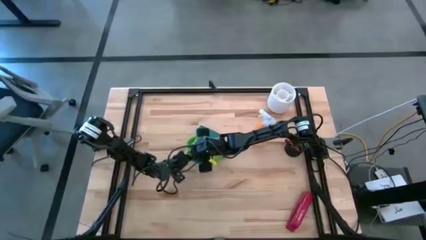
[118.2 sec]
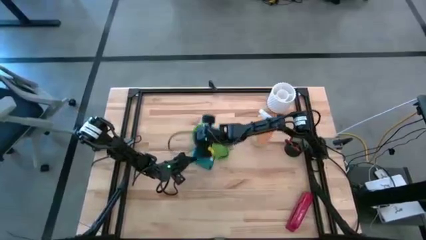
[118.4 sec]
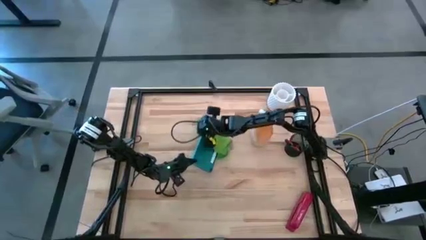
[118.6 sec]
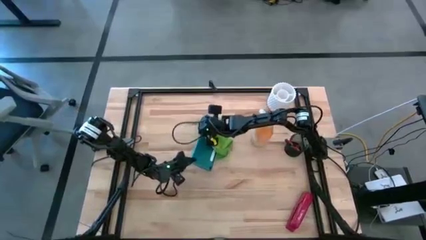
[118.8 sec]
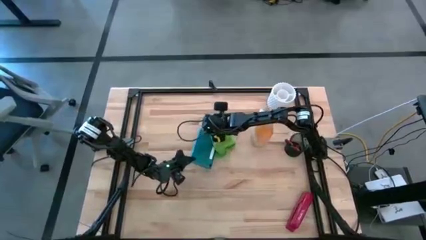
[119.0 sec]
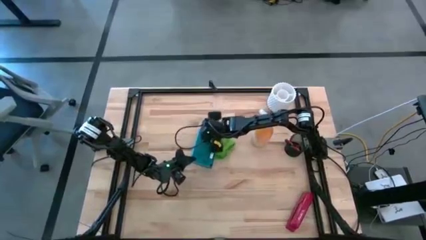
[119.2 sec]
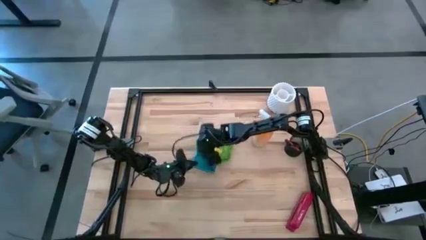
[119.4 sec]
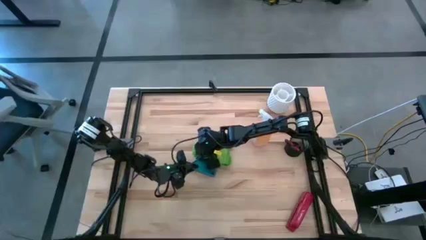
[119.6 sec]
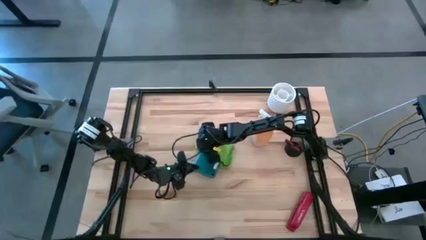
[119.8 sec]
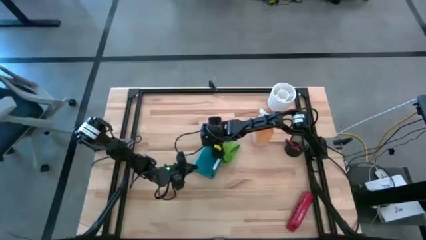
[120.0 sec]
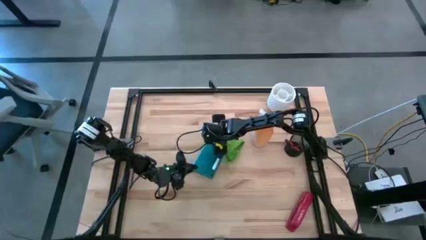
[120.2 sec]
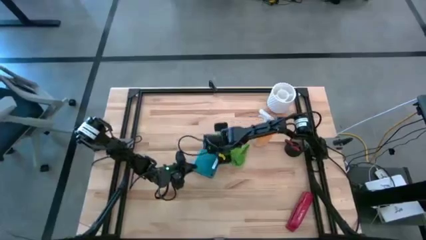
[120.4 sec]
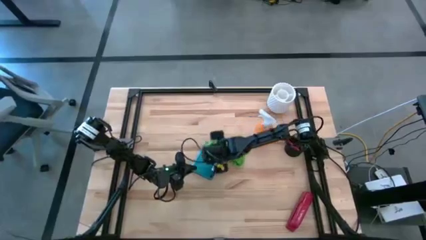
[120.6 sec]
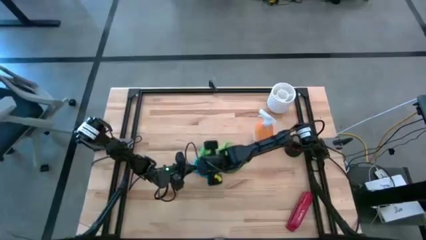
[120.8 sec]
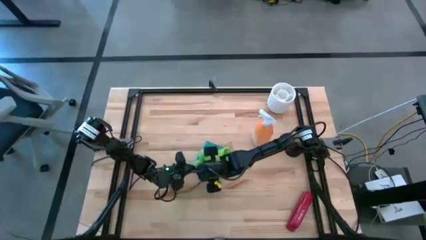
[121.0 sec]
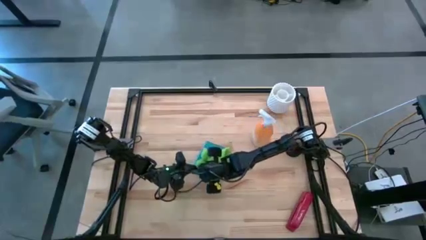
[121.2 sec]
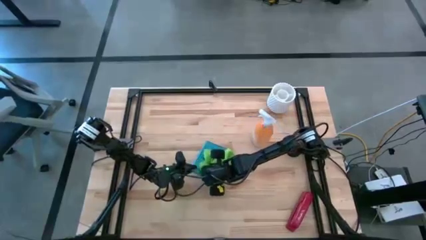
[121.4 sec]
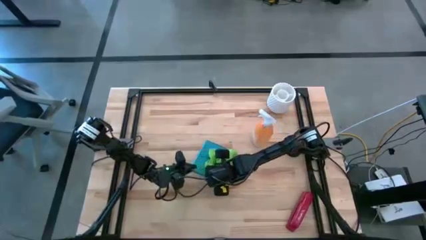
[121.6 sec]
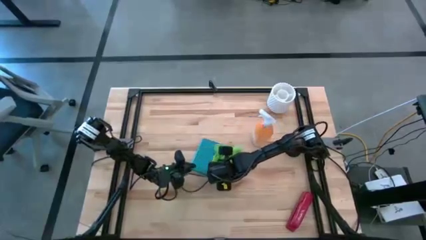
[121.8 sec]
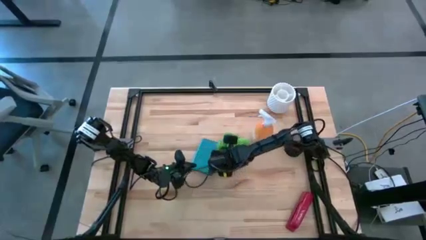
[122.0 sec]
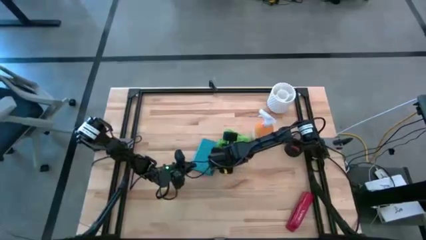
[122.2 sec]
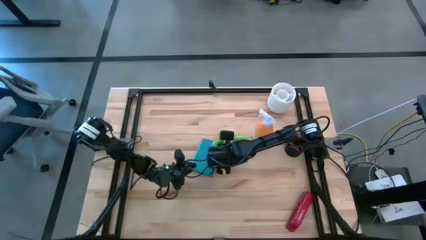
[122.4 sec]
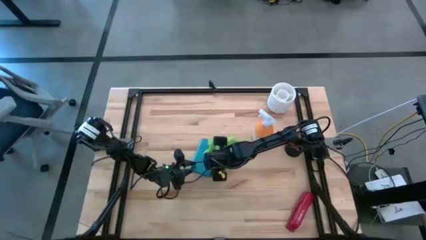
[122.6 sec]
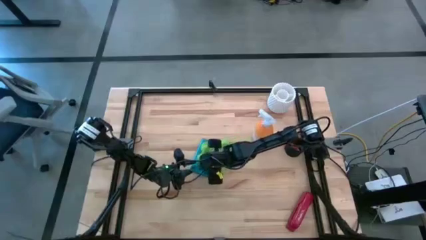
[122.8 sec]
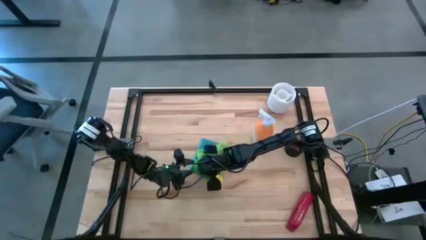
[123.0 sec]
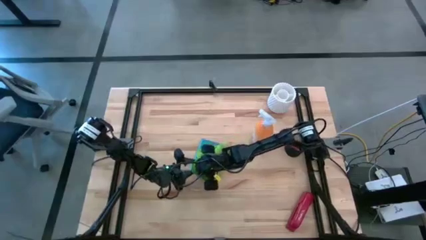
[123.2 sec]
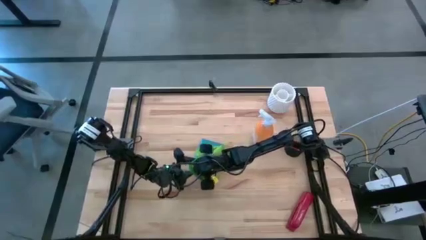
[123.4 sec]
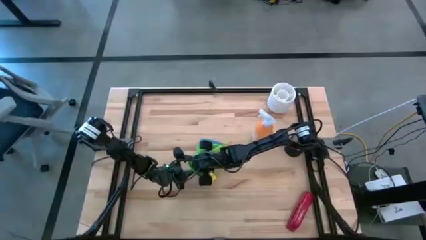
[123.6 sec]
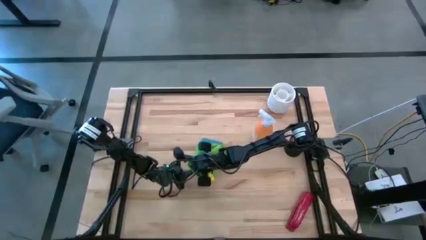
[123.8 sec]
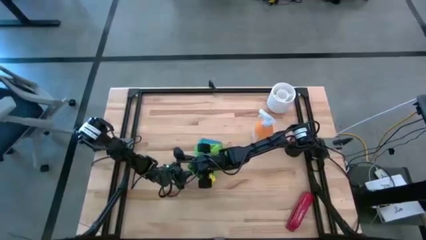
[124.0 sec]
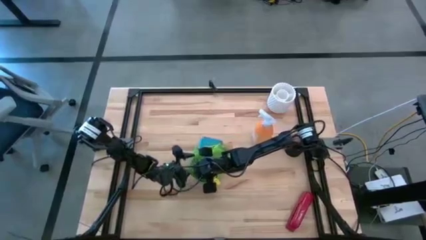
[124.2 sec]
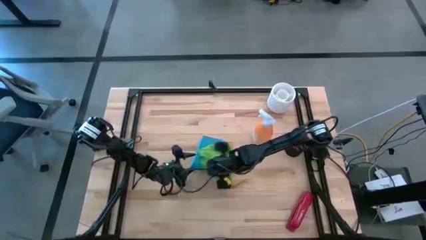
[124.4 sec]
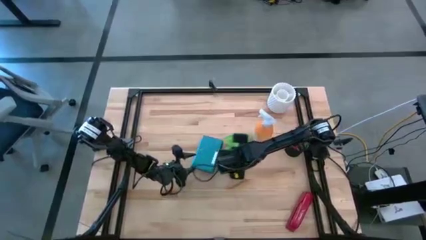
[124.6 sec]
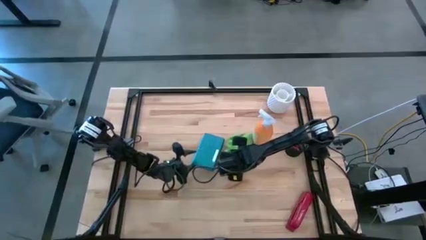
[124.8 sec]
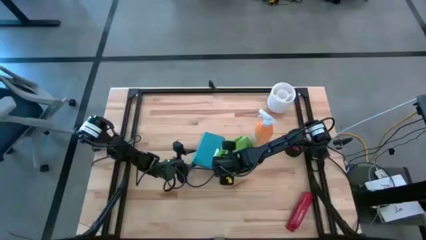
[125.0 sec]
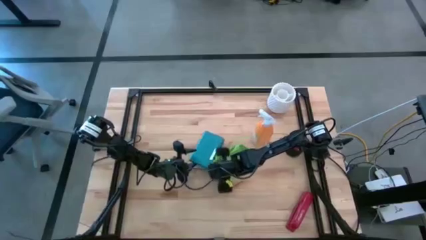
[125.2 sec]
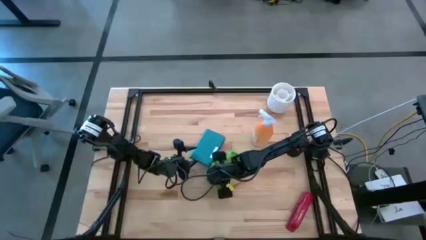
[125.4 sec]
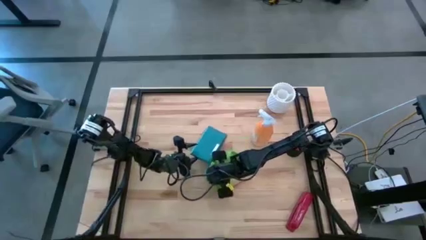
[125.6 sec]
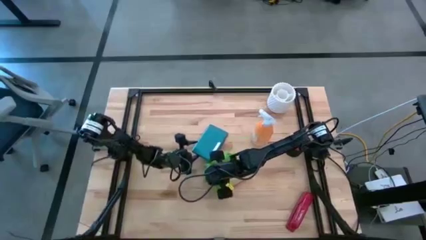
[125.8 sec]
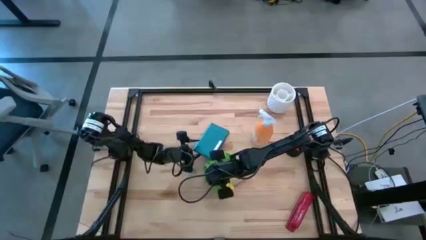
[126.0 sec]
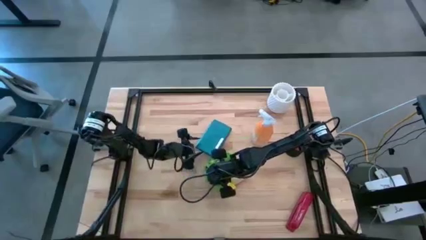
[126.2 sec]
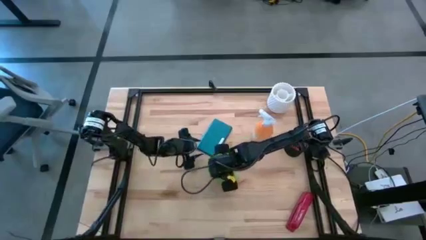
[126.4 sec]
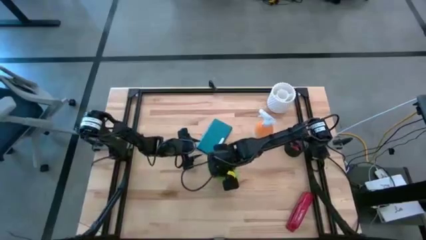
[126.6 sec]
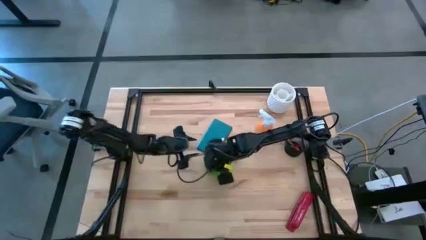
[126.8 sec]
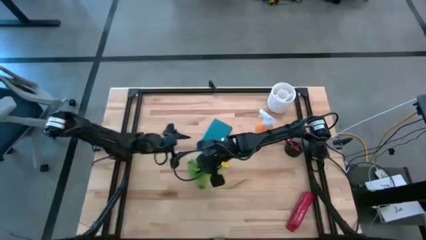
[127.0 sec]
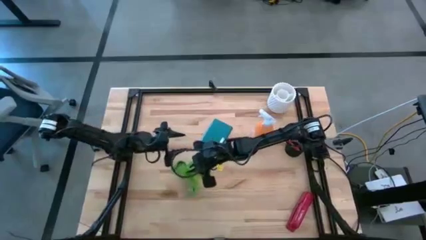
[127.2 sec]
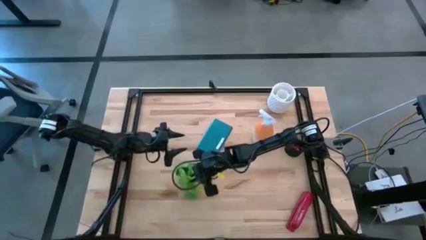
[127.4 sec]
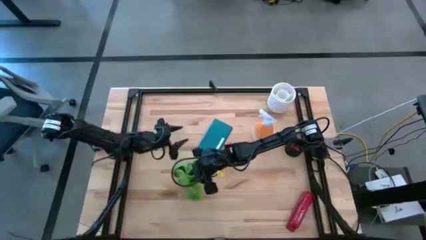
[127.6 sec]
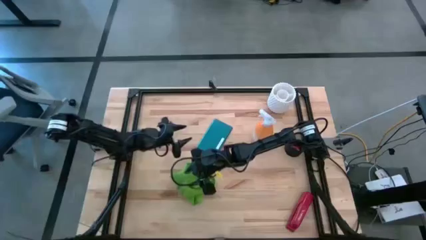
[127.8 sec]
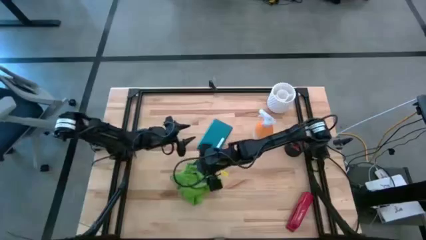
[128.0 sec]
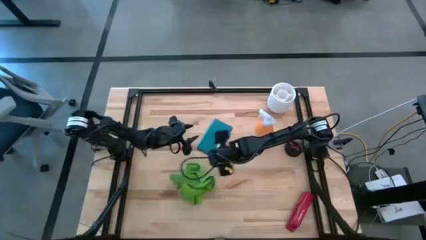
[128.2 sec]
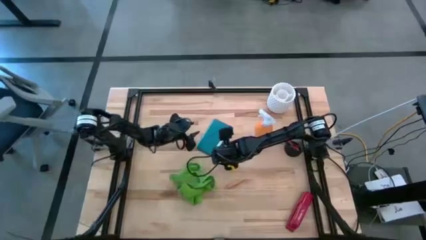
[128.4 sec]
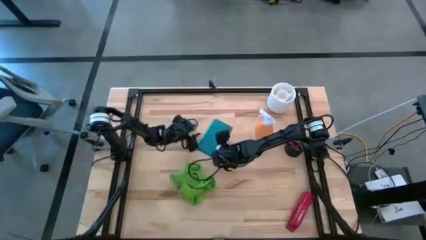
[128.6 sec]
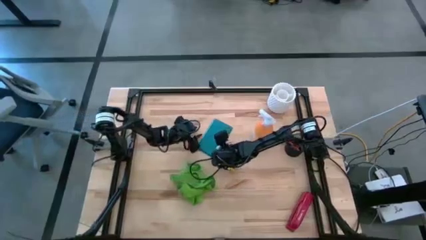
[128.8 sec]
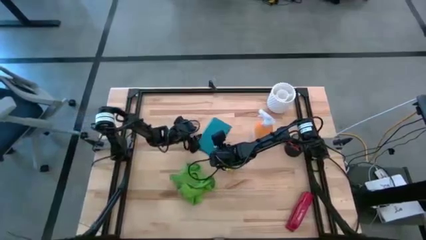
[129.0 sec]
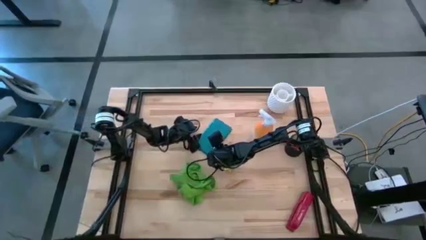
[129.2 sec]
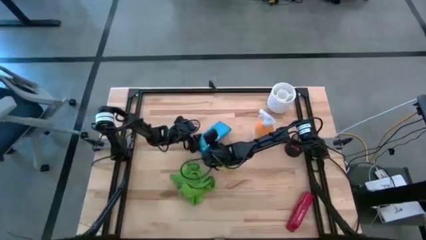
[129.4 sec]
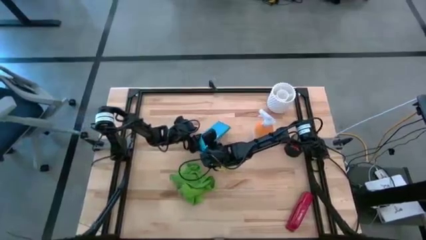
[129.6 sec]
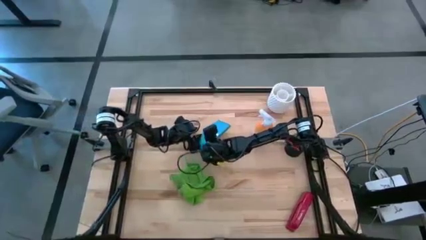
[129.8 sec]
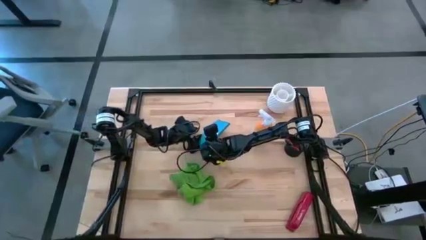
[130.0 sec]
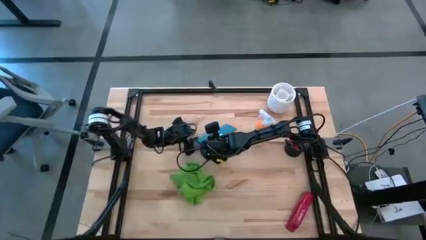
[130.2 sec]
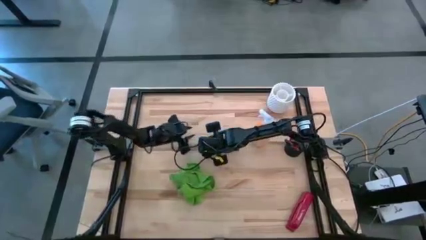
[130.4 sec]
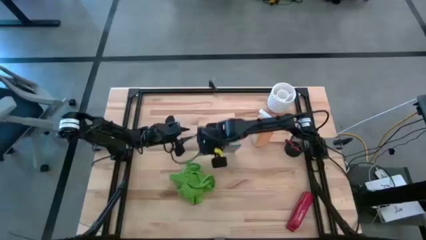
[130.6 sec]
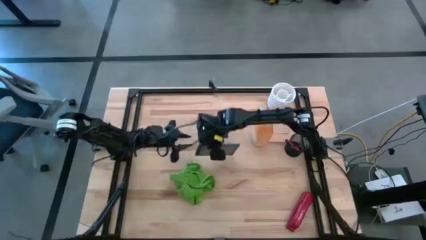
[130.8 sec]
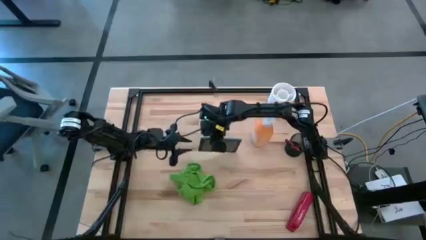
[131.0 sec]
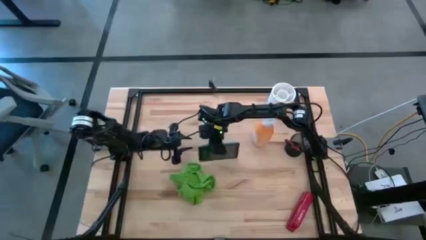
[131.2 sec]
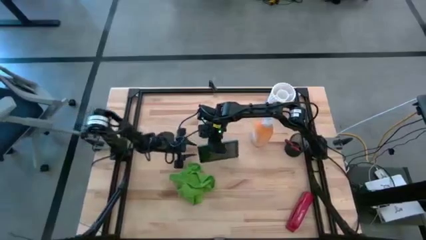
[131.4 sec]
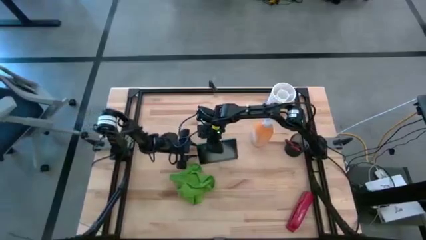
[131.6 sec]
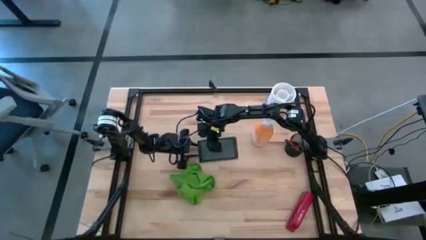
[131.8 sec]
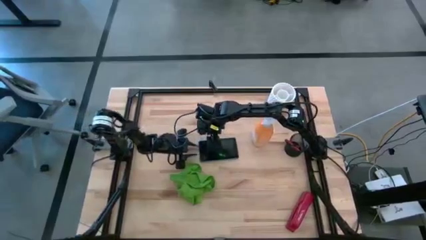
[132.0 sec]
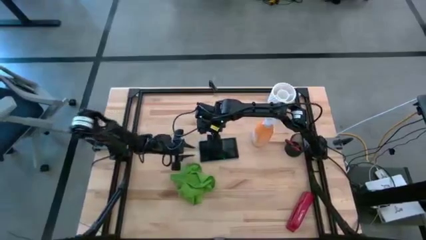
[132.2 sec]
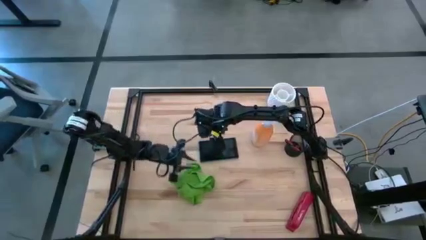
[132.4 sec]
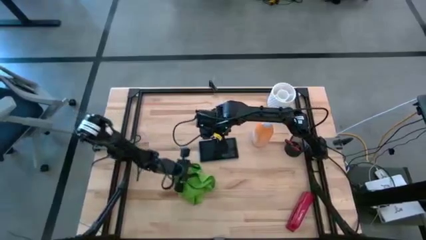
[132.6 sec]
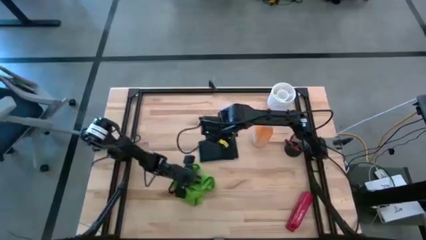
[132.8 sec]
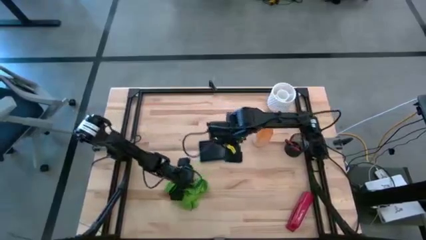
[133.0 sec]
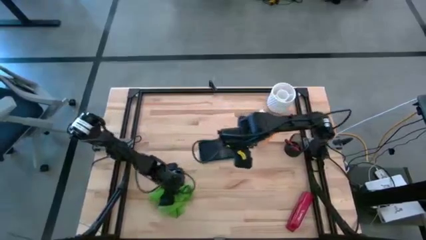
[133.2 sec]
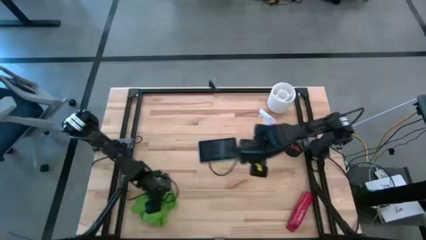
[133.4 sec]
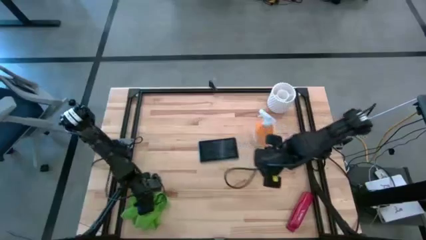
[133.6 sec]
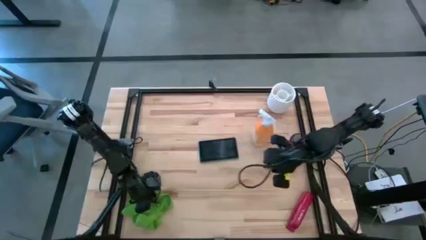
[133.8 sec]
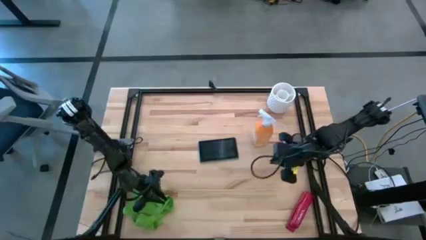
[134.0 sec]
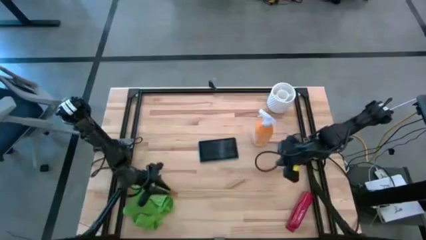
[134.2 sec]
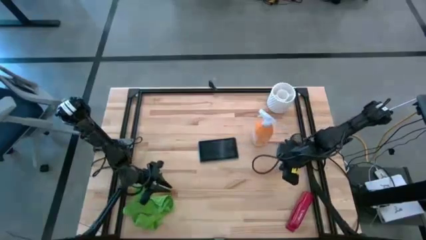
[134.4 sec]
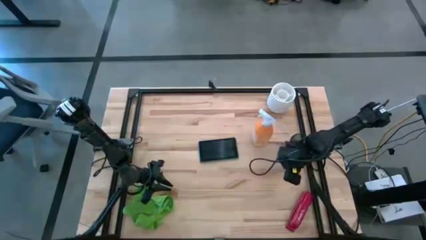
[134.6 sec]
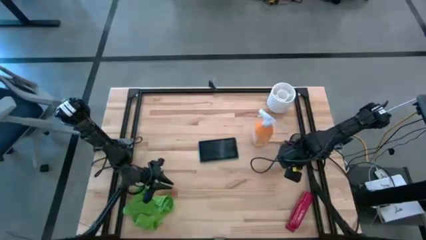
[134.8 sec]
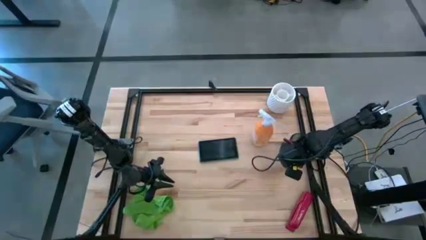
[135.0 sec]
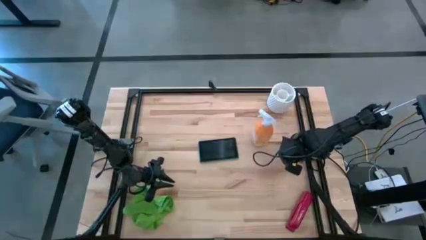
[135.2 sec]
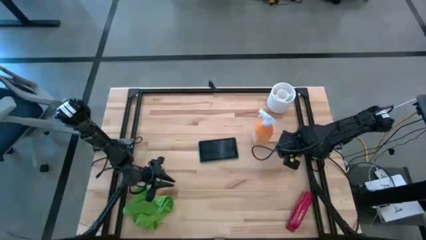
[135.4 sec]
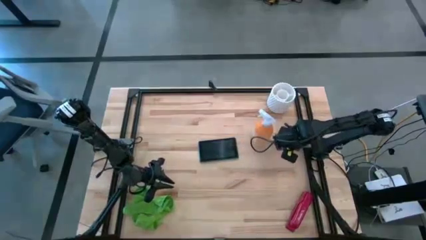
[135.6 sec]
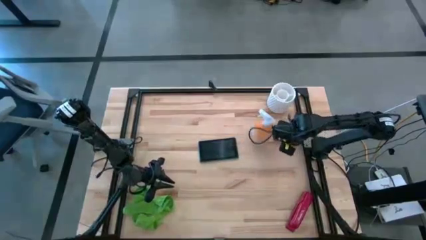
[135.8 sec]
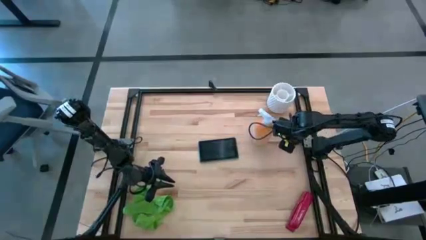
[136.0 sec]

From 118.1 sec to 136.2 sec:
Task: Apply microfiber cloth
Wipe the back and front of the tablet with the green microfiber cloth
